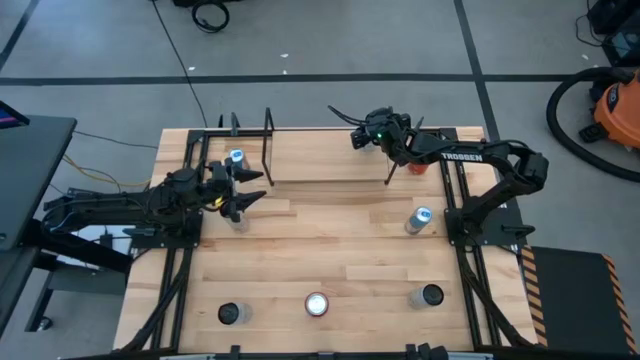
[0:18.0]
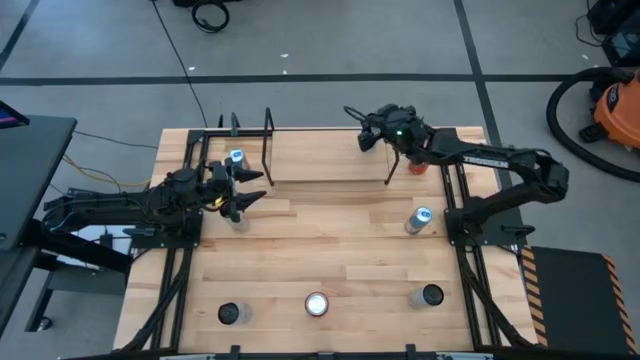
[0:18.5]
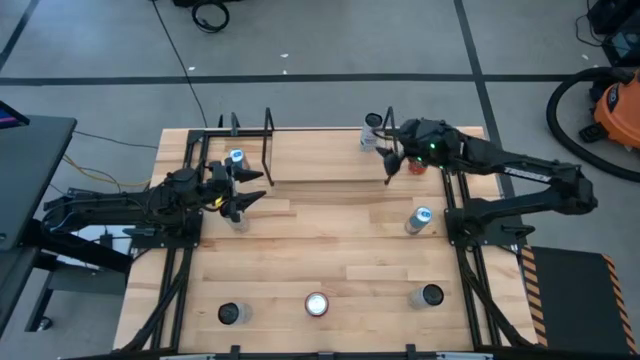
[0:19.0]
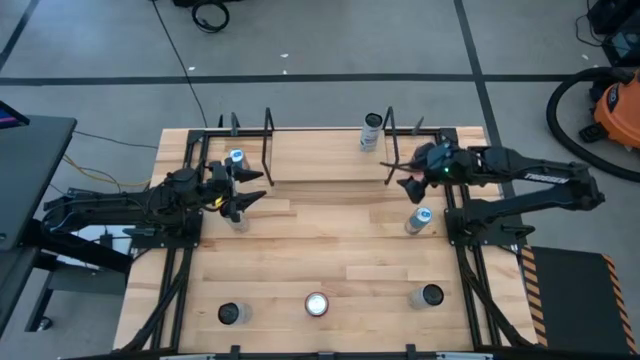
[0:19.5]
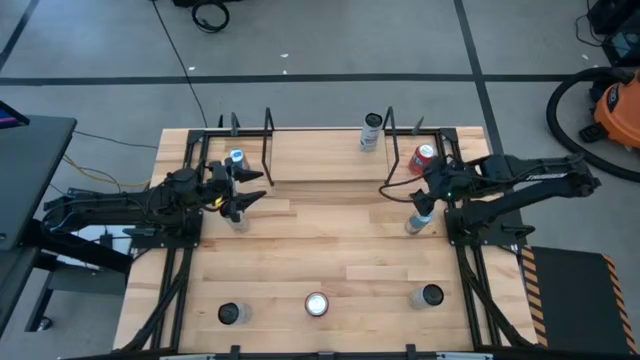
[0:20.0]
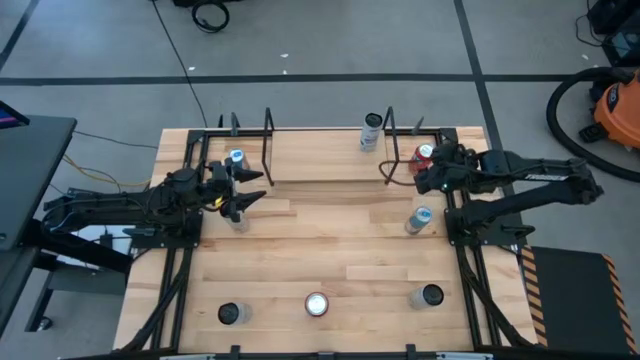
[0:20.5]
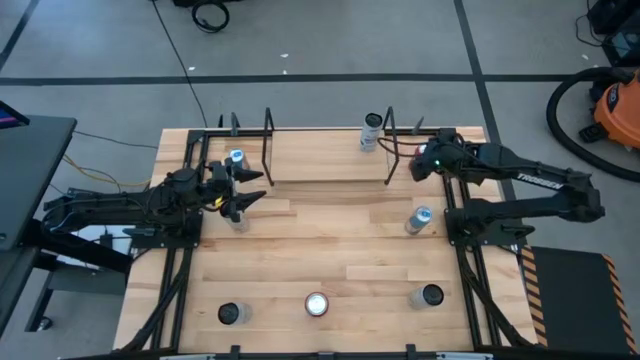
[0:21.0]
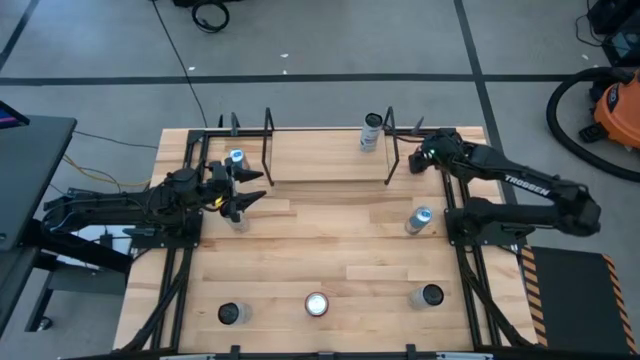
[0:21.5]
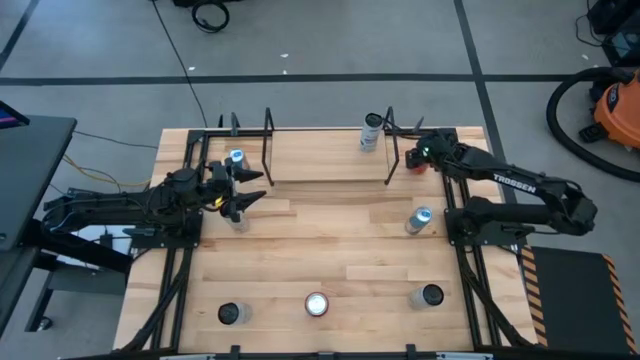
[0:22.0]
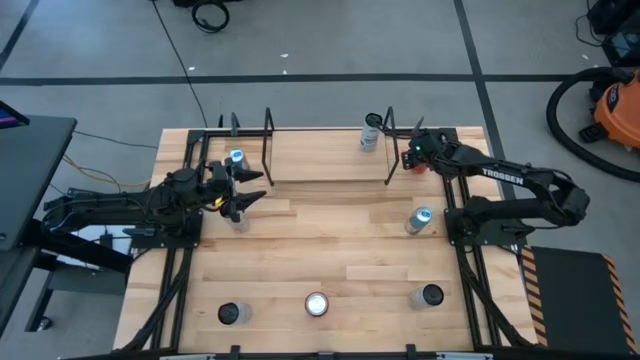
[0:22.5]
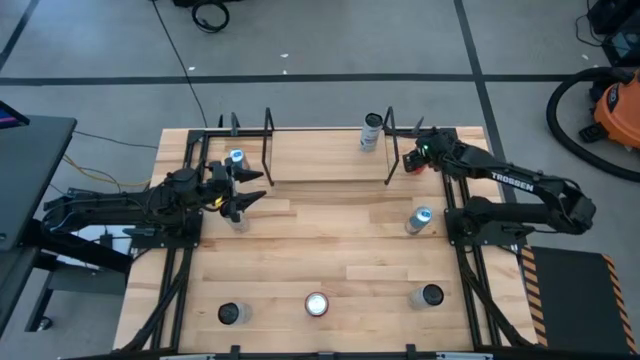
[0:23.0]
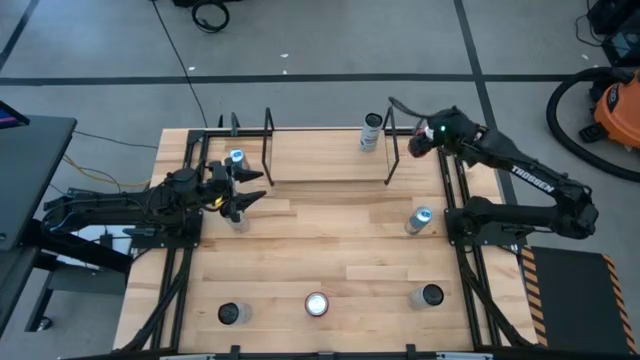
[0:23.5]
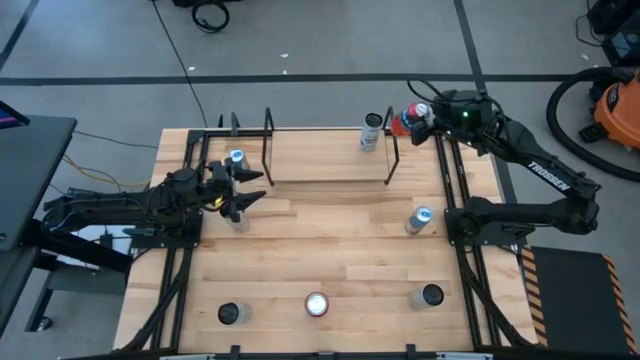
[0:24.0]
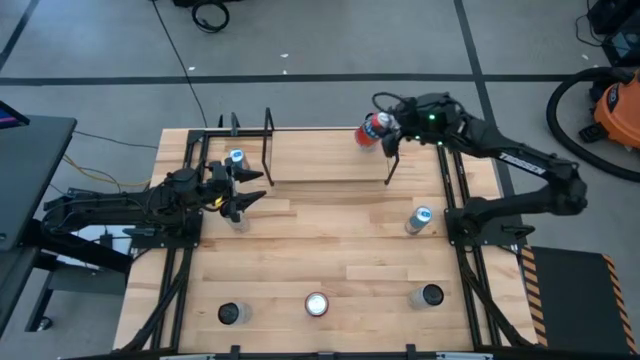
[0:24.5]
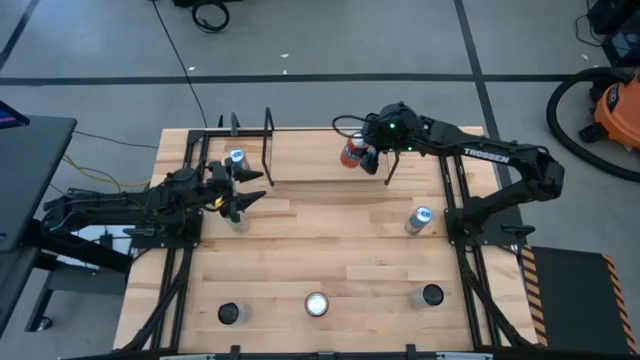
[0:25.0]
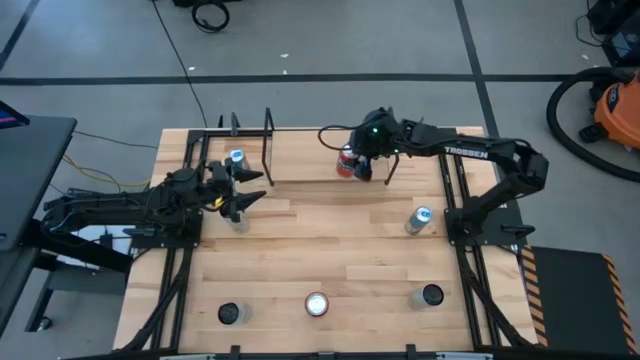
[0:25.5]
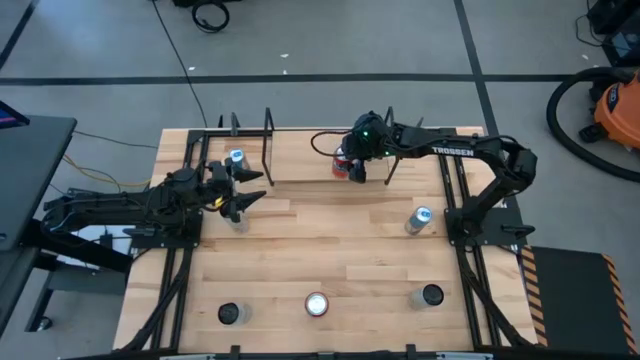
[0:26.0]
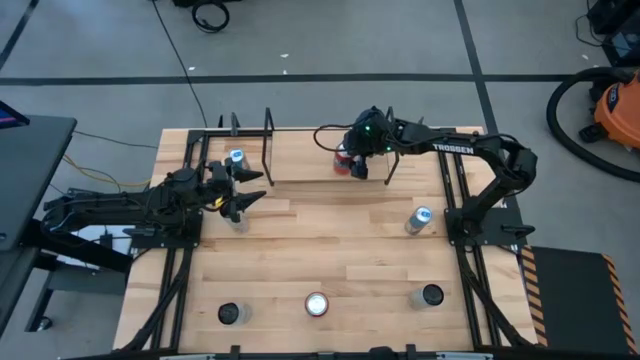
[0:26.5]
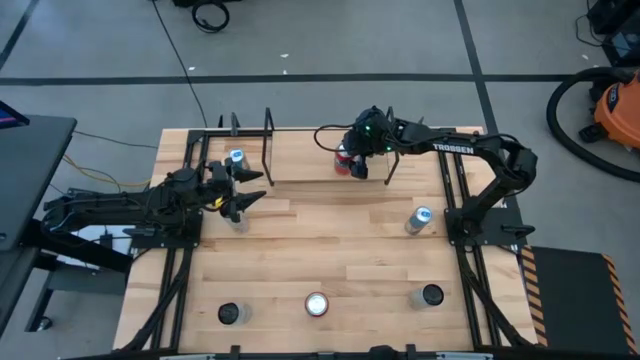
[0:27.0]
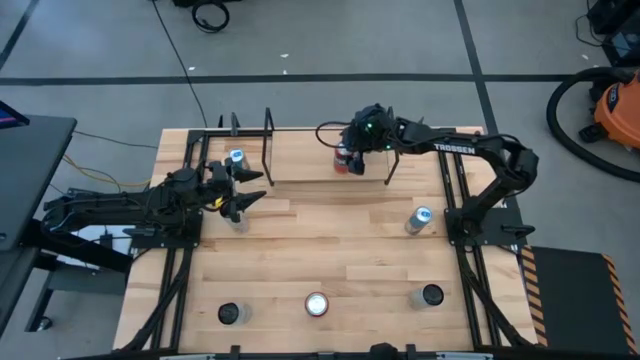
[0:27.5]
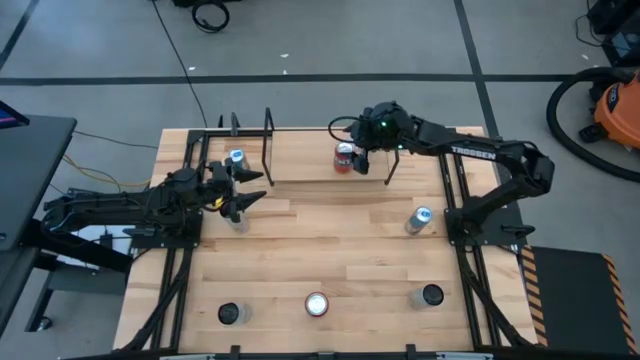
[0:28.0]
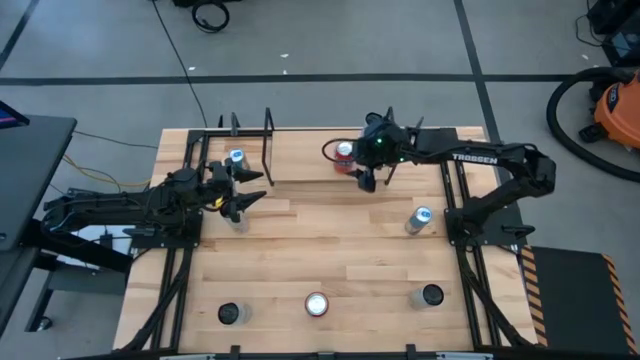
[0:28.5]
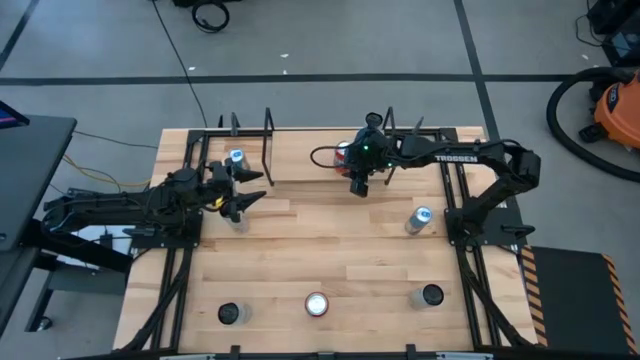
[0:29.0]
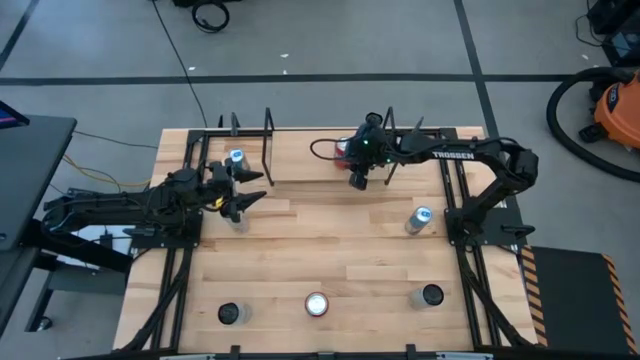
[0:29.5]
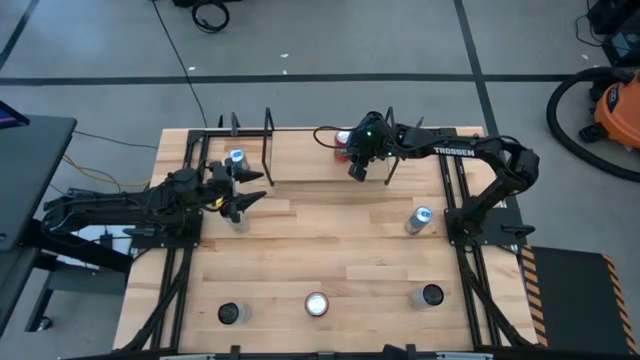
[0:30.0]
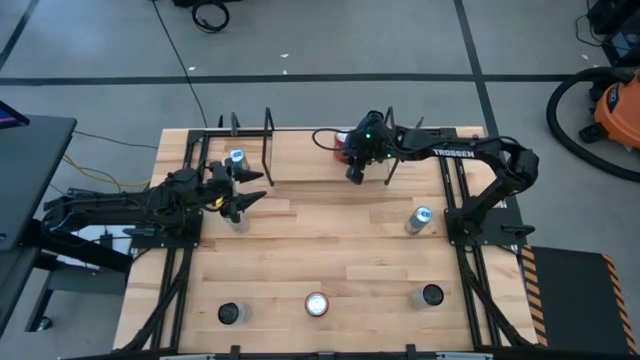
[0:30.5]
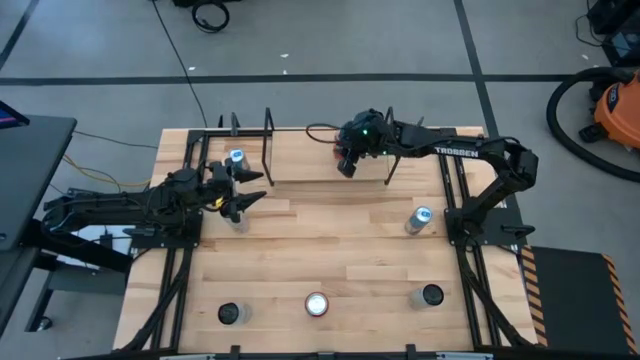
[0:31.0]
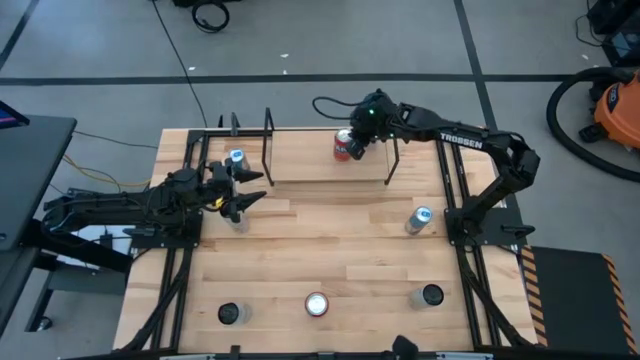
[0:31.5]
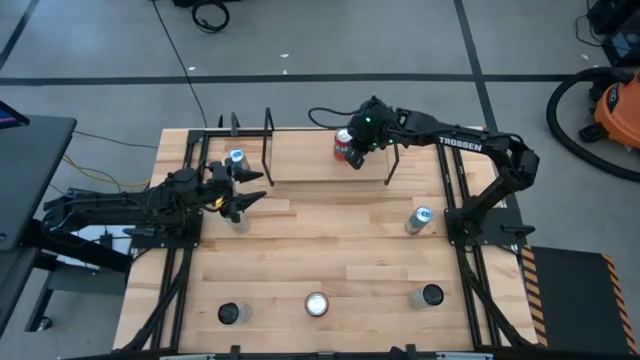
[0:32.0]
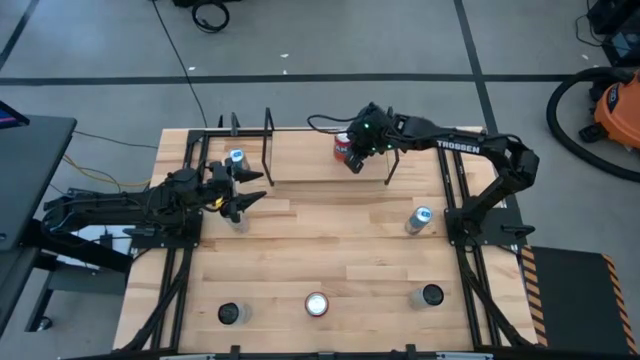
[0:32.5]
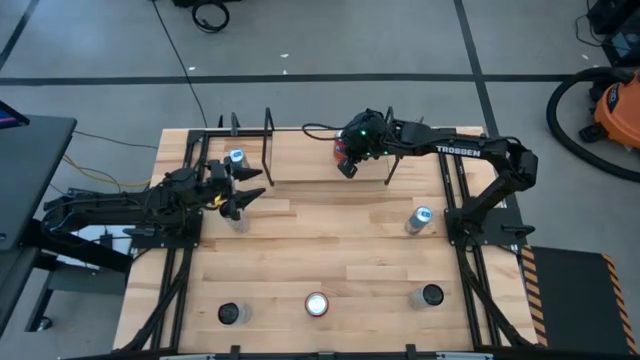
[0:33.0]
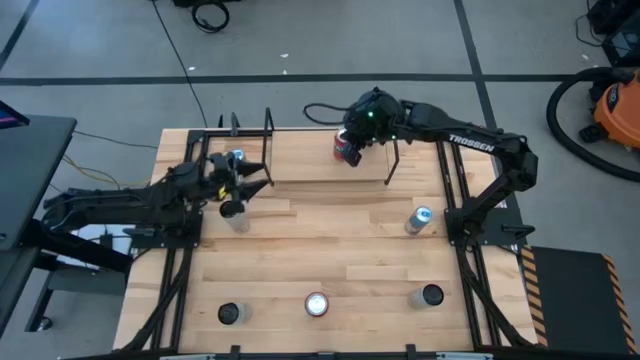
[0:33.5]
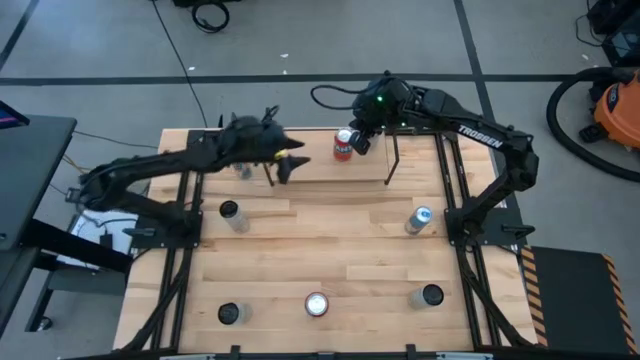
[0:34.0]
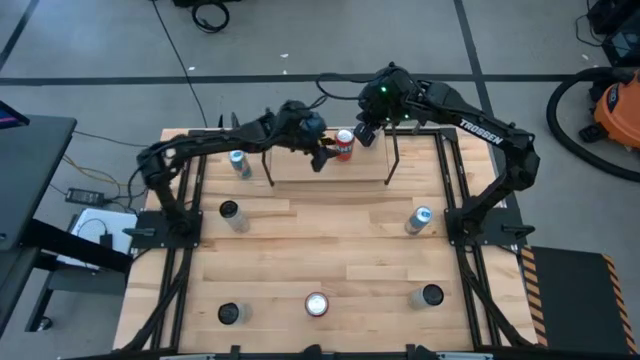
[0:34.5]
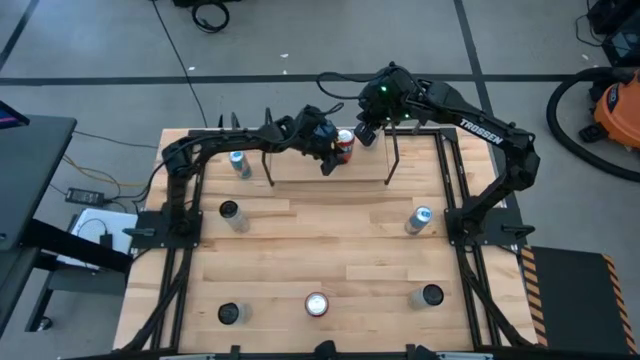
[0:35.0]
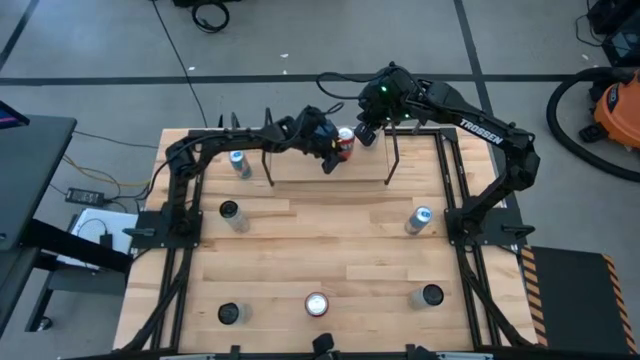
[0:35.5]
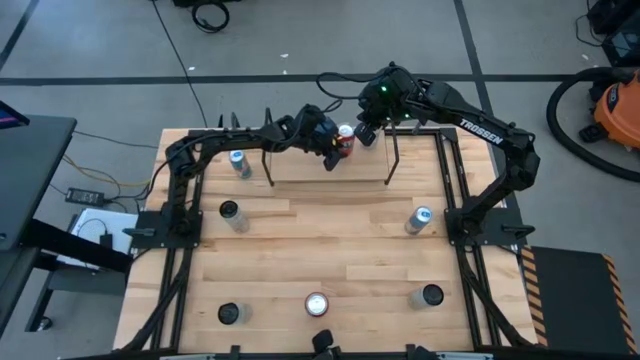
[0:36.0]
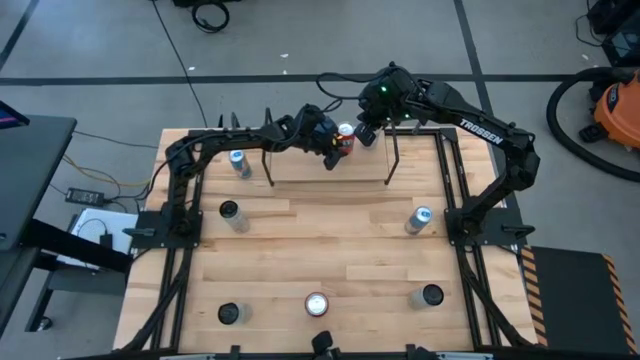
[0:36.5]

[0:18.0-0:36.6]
Task: Place canned beverage on shelf
Put the top red soda can on the shelf
